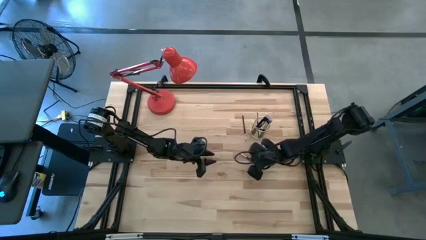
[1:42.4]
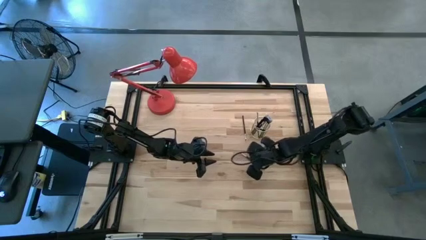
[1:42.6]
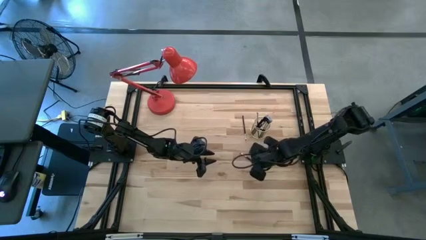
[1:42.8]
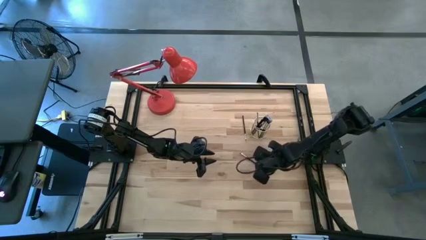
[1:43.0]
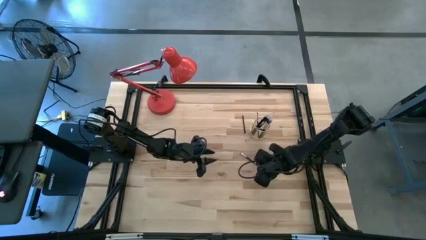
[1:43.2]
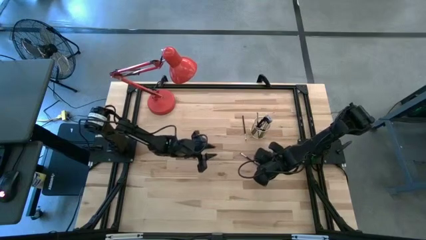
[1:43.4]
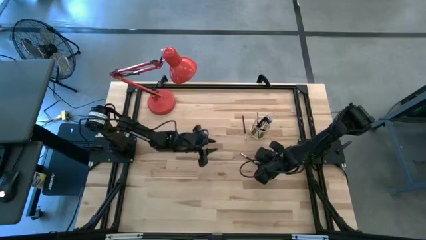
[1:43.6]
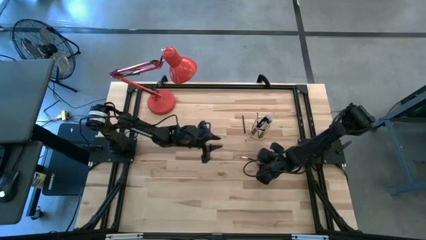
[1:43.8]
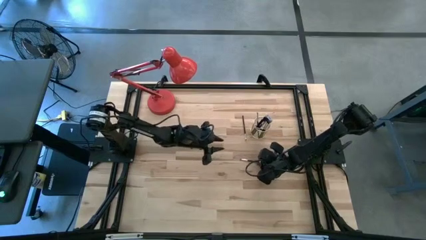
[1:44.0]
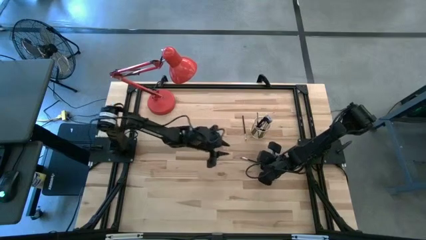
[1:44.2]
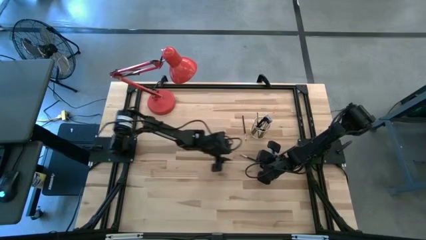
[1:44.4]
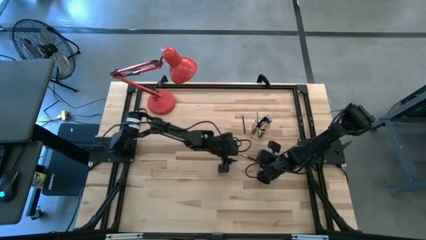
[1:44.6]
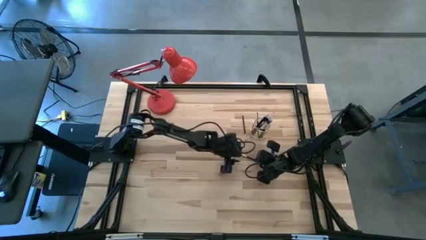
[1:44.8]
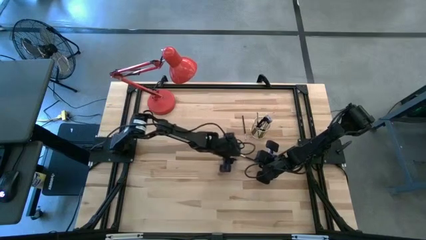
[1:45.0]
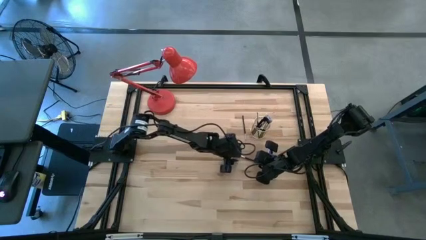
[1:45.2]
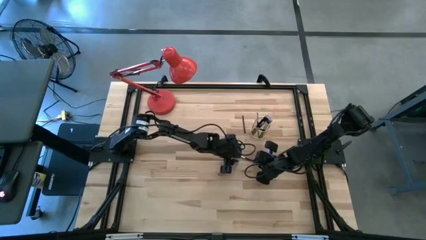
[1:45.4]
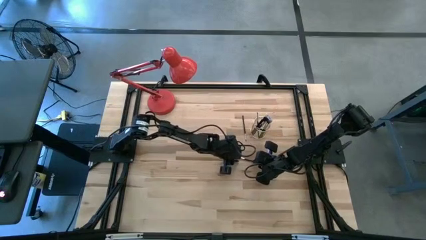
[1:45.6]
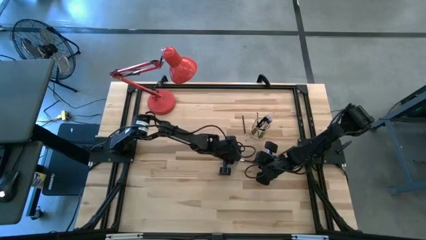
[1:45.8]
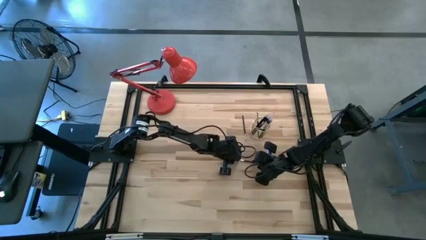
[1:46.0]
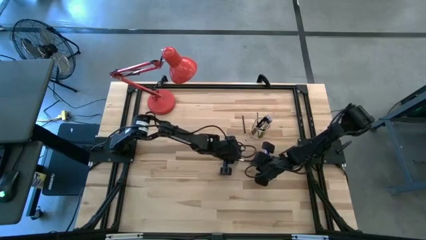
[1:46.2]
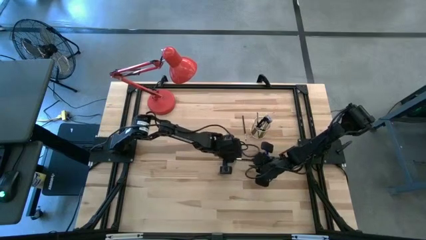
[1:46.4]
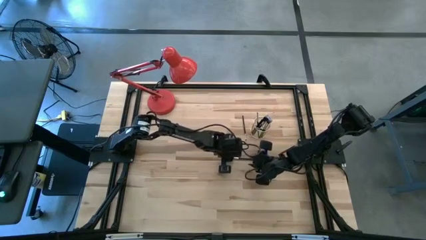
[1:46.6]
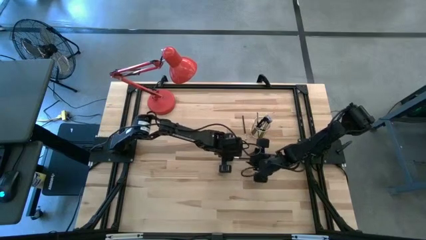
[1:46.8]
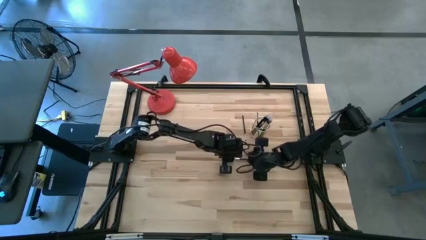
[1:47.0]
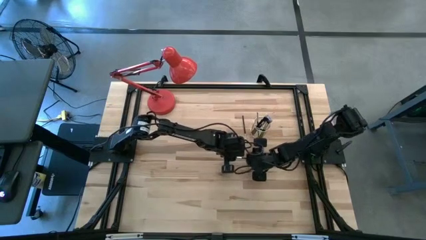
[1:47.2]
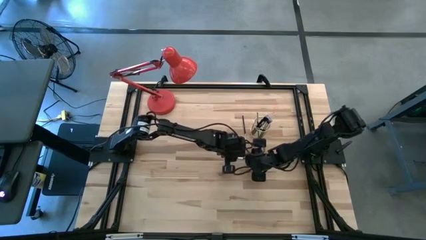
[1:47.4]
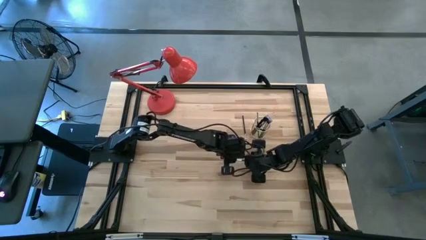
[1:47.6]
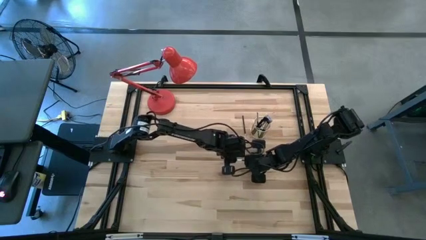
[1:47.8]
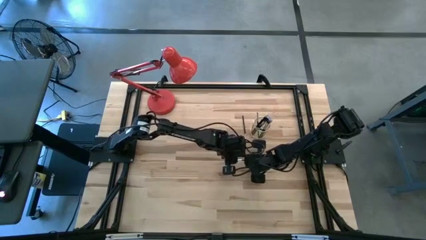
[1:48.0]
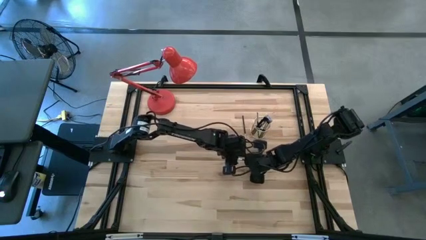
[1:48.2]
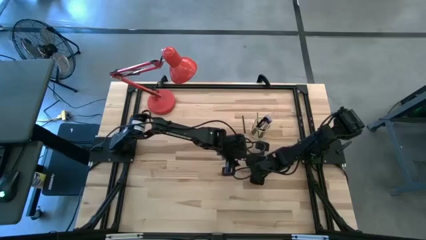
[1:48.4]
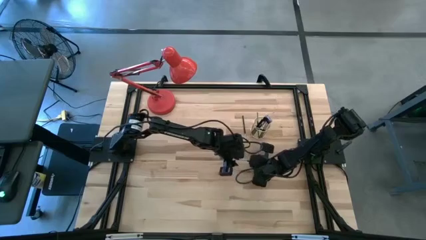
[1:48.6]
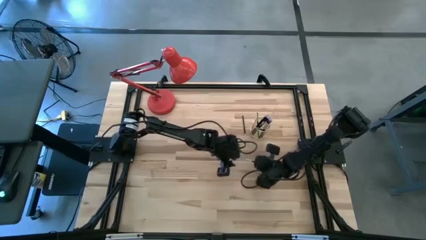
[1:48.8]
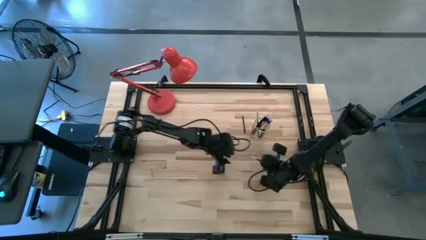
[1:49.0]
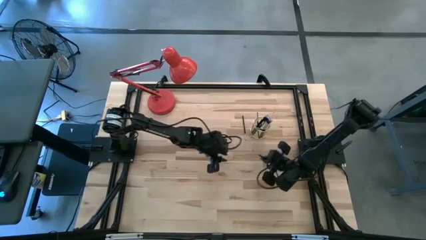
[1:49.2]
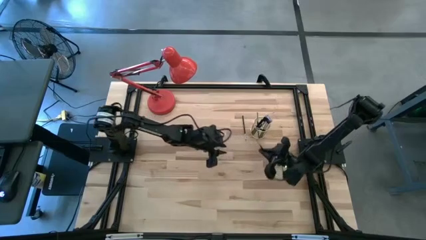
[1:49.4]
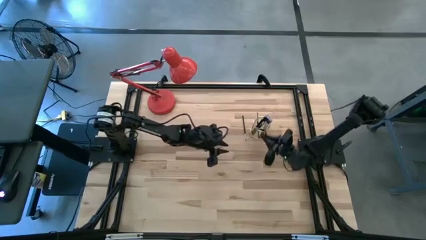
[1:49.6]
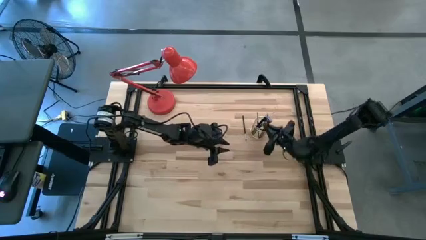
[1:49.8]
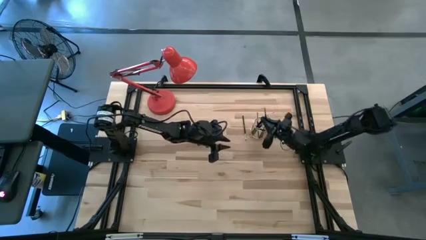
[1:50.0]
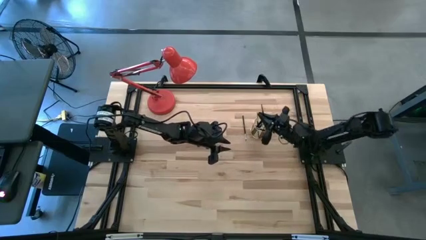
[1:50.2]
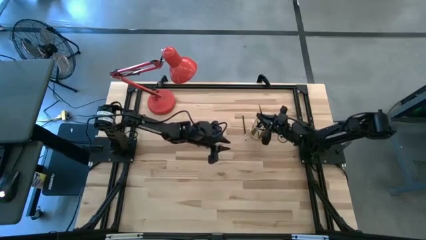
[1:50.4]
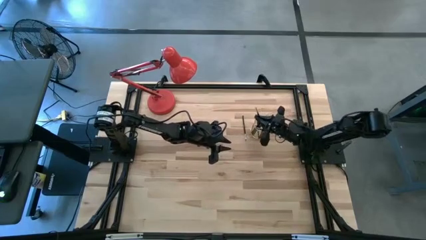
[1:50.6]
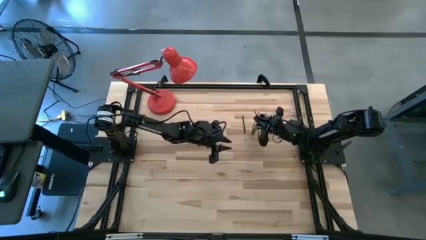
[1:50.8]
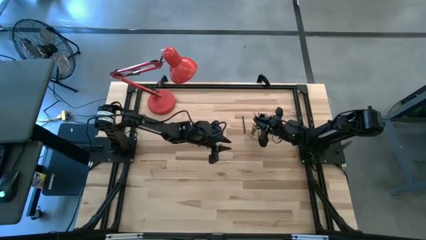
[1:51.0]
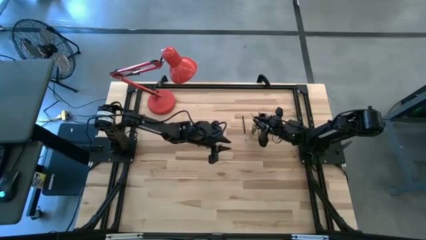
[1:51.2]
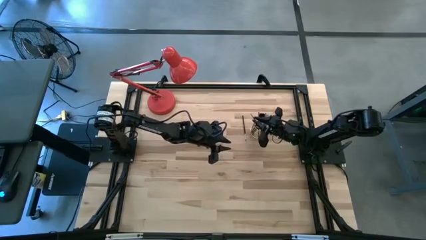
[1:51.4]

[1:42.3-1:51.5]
Task: Put items in baskets/containers
Put the black brush into the gold holder

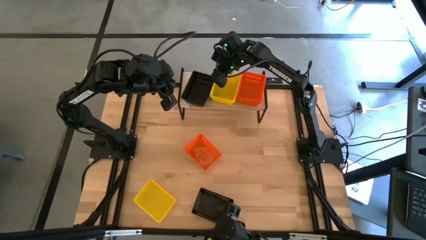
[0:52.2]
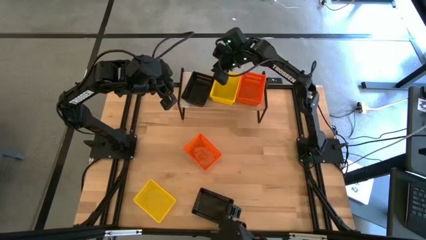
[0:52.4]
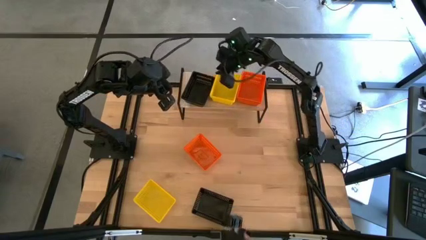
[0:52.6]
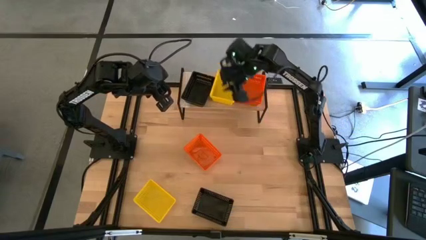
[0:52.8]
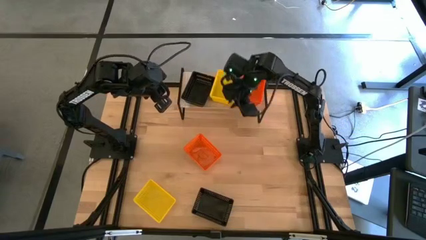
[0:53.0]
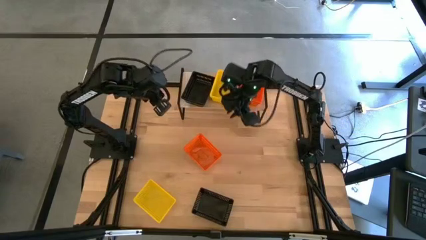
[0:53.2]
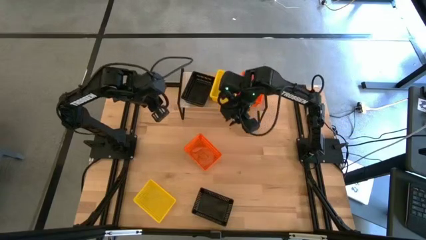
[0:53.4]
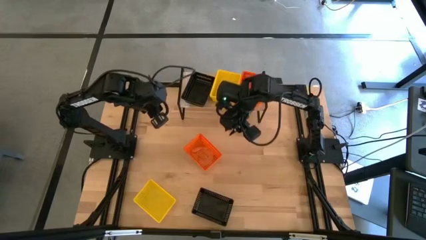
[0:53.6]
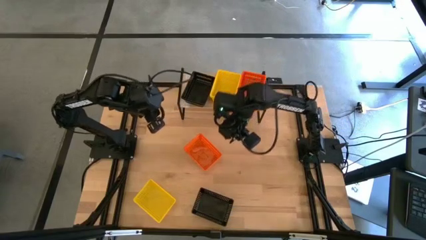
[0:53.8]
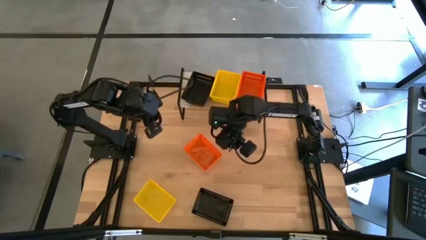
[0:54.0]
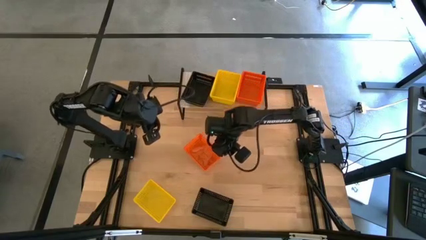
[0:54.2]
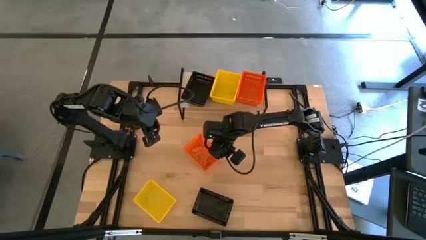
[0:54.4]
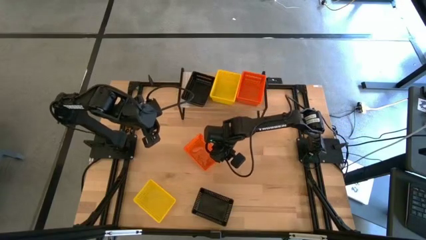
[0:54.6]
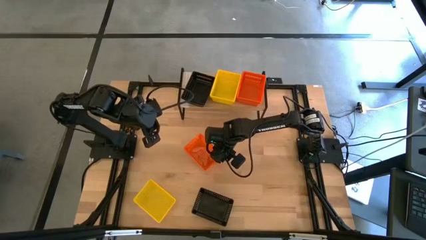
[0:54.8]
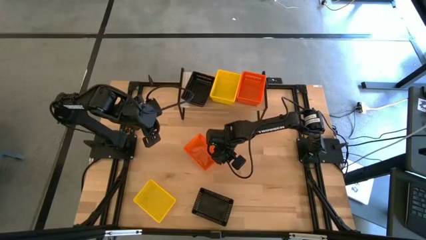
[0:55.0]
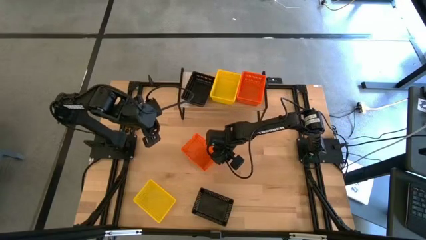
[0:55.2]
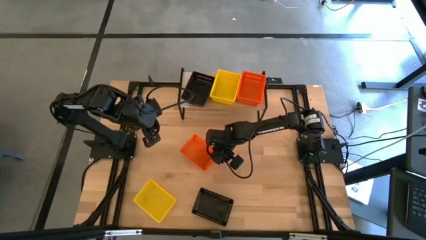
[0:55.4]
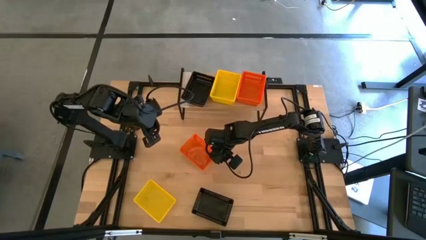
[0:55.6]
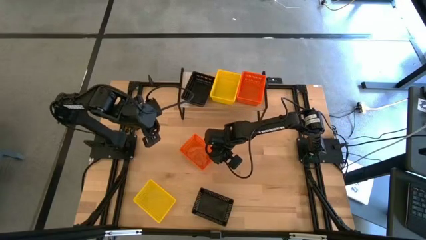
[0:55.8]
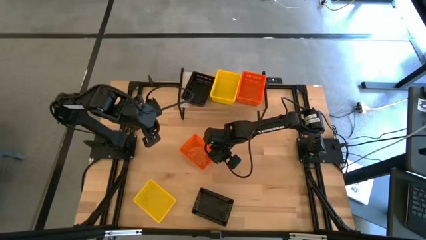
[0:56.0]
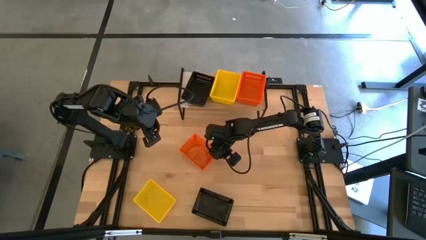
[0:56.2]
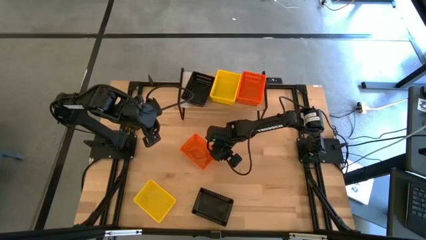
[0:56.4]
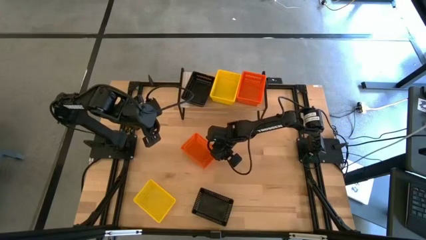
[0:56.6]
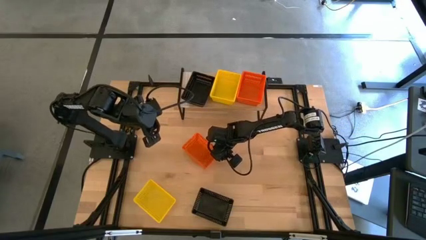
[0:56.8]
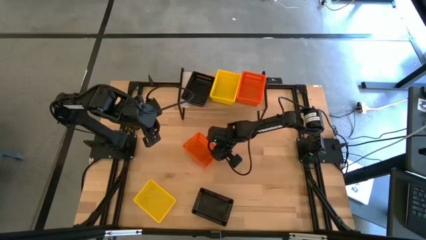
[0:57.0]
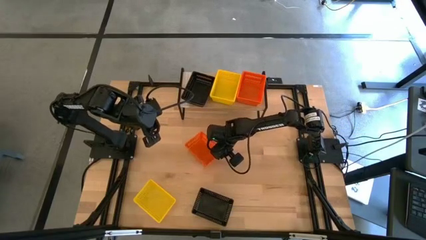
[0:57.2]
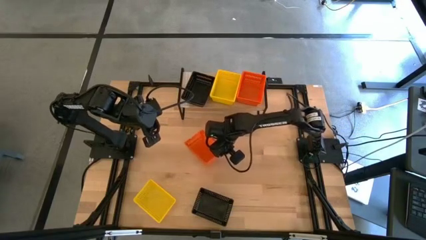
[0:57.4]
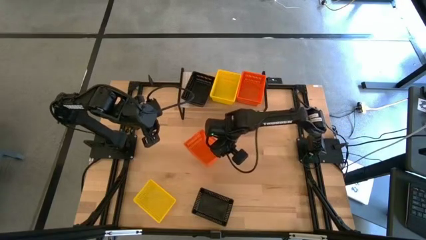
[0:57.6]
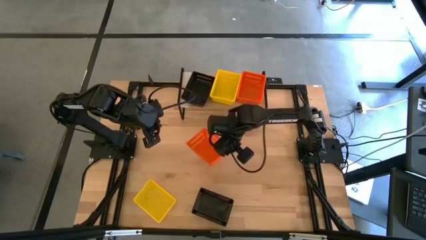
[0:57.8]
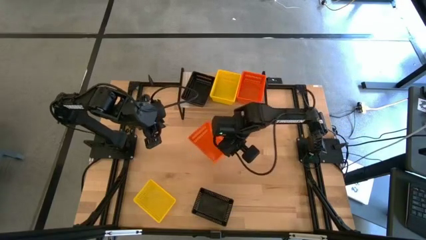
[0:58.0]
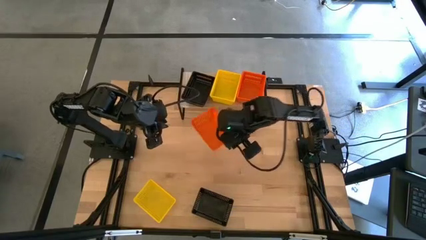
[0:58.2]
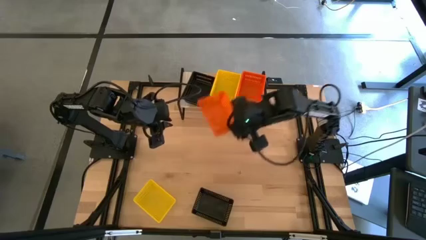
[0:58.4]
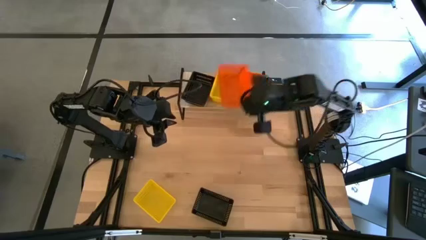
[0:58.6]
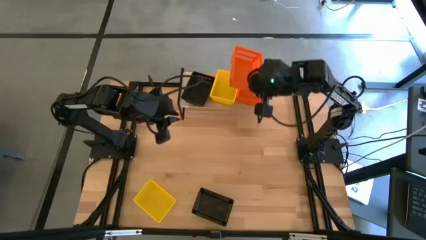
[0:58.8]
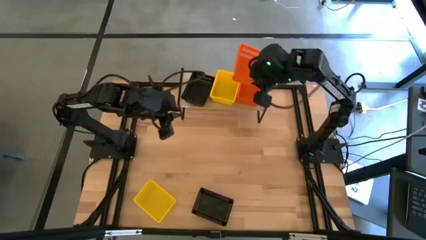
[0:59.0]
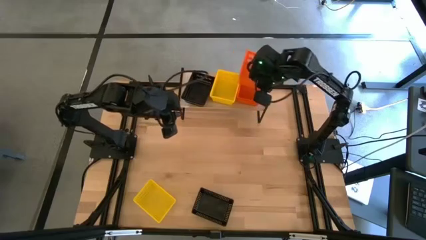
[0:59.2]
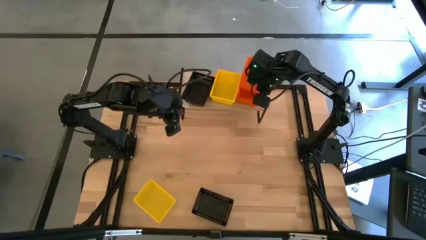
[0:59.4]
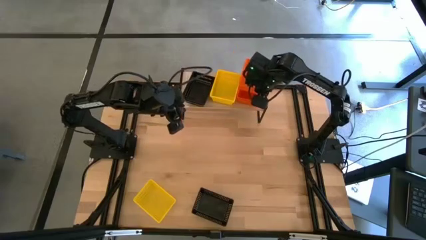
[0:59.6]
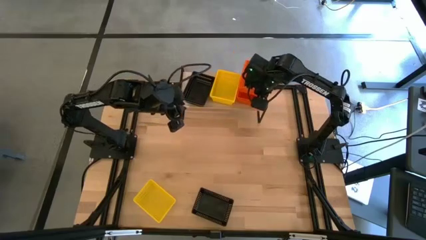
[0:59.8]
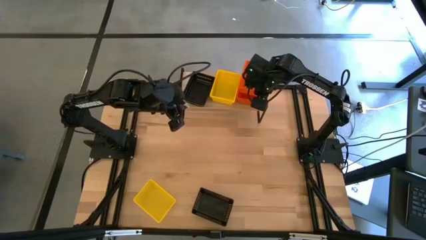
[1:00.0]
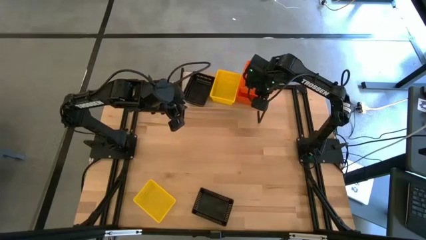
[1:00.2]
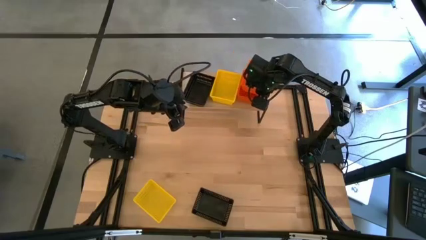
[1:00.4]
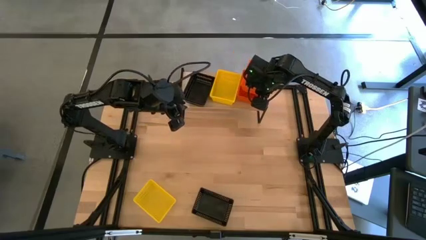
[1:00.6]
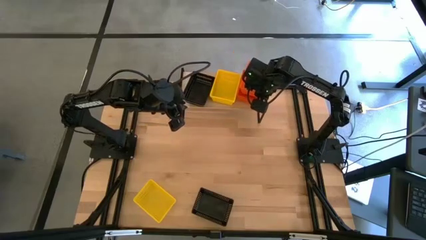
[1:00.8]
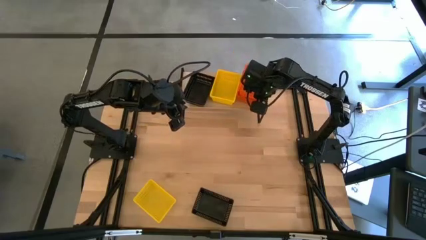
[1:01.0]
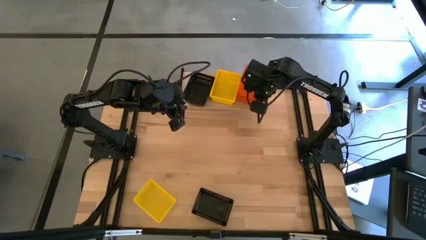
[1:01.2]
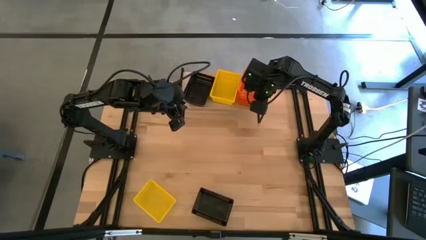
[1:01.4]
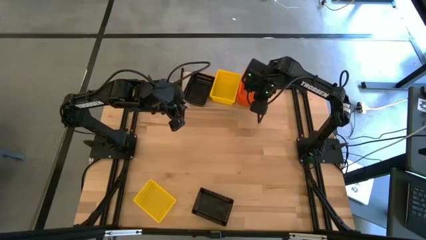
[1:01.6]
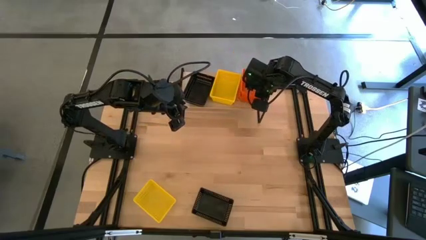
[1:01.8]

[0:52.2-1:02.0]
Task: Stack baskets on shelf by color
Stack the orange basket on the orange baskets on the shelf
